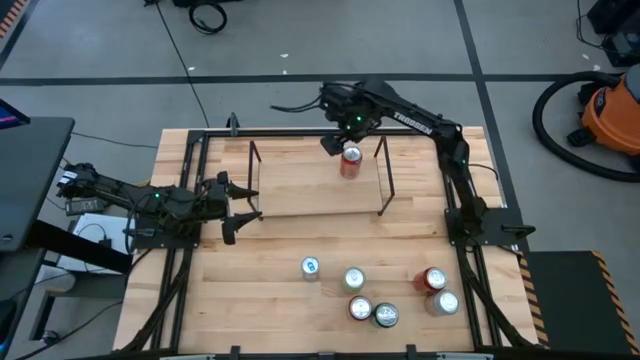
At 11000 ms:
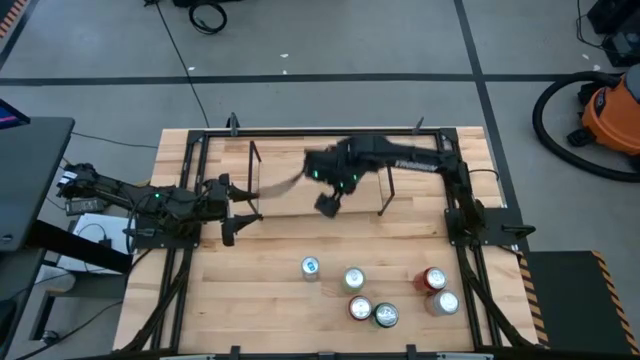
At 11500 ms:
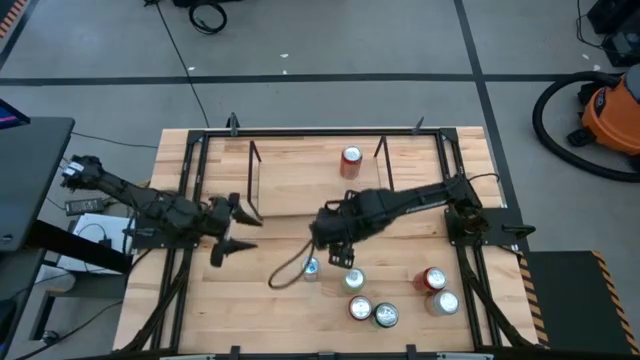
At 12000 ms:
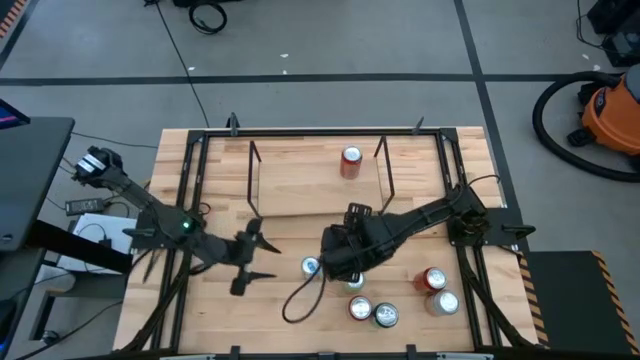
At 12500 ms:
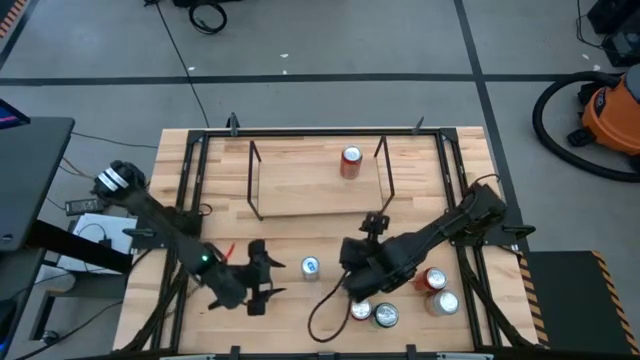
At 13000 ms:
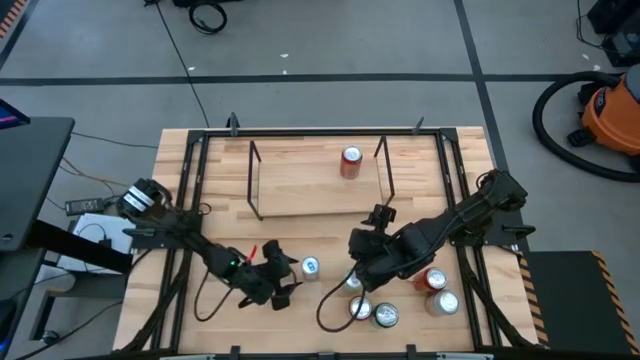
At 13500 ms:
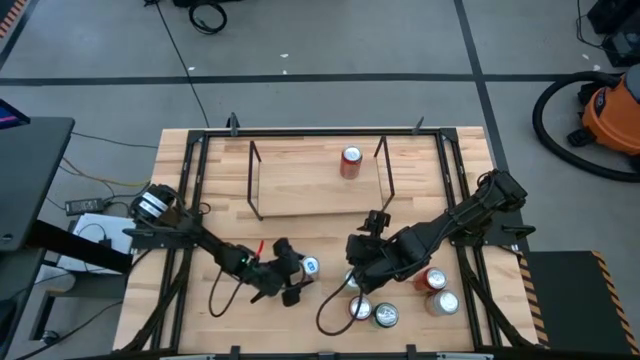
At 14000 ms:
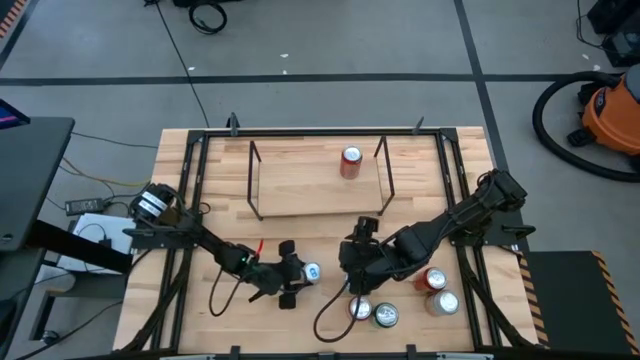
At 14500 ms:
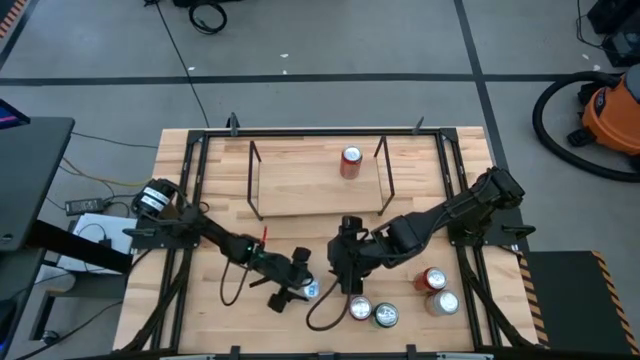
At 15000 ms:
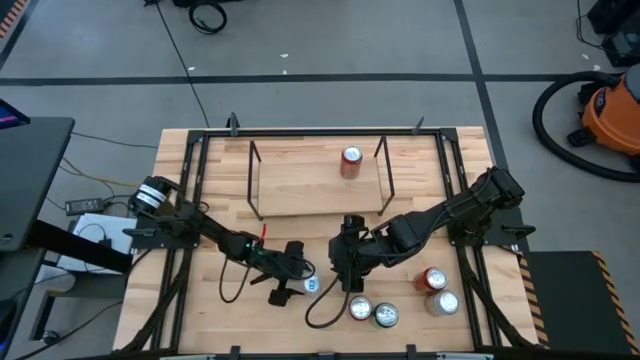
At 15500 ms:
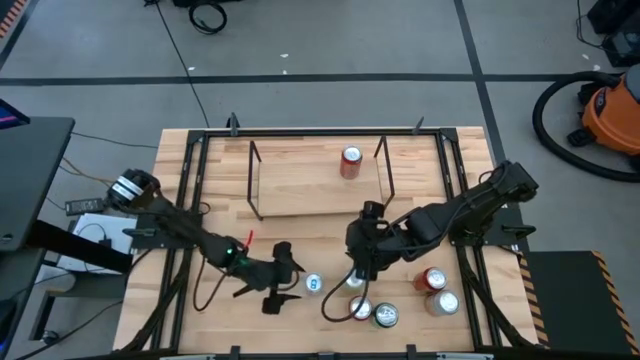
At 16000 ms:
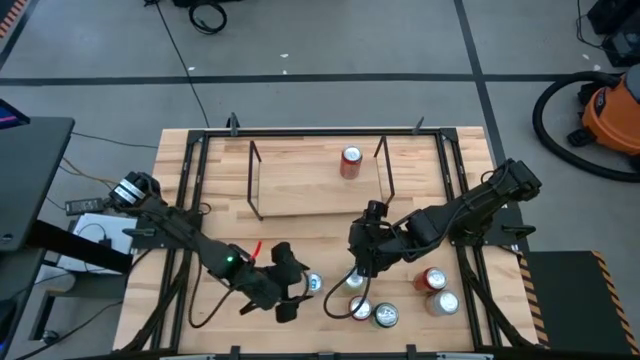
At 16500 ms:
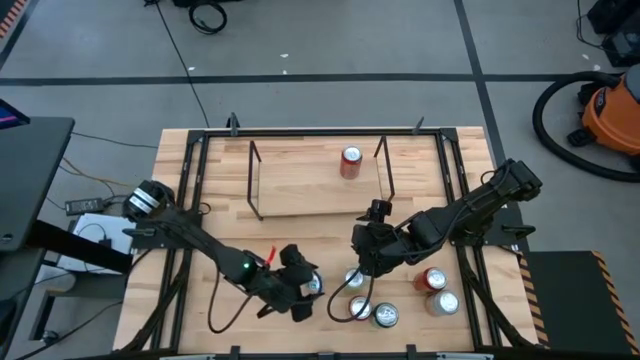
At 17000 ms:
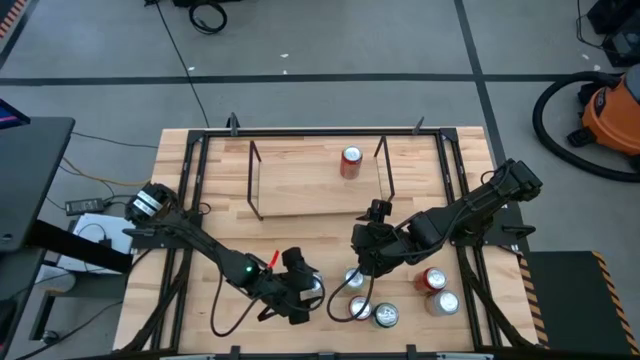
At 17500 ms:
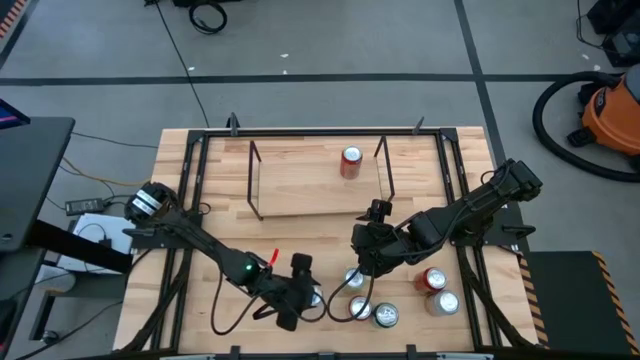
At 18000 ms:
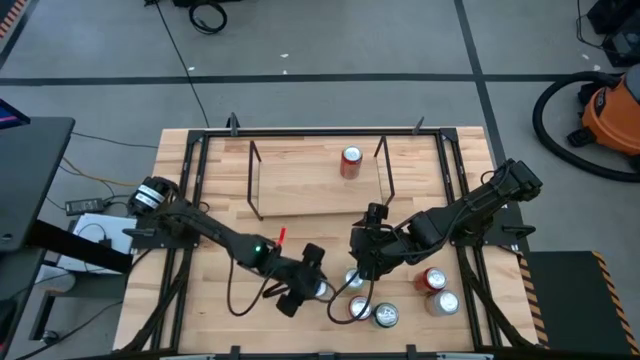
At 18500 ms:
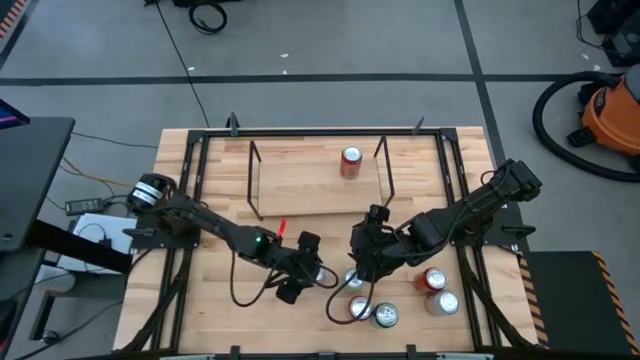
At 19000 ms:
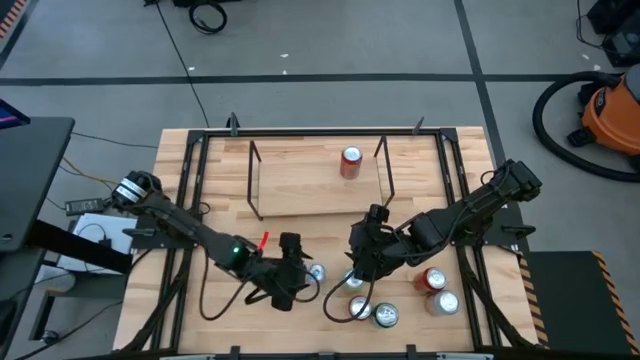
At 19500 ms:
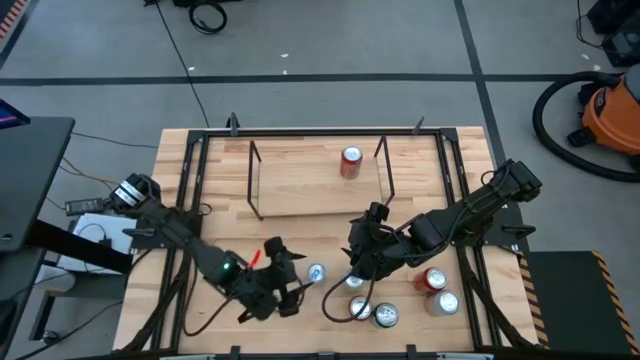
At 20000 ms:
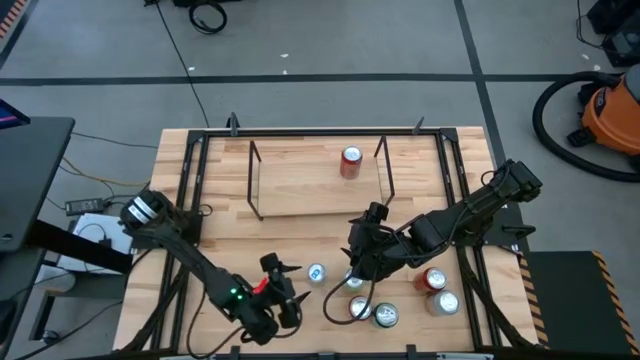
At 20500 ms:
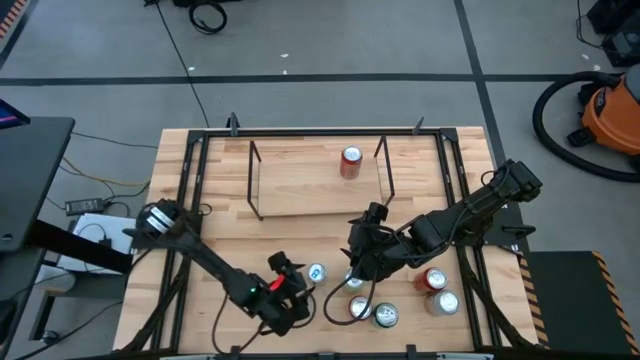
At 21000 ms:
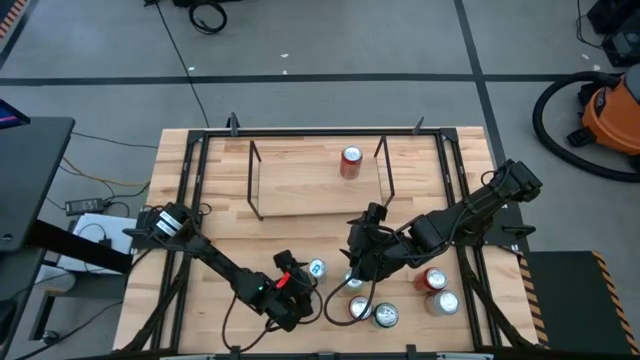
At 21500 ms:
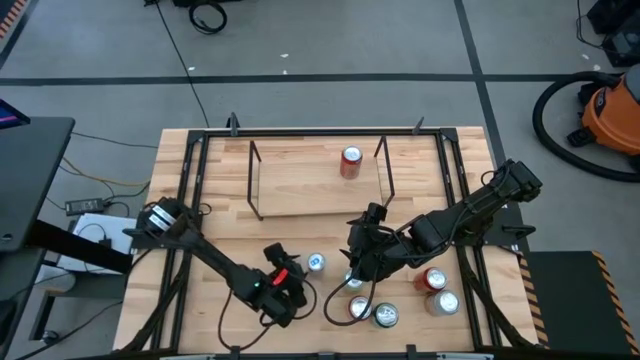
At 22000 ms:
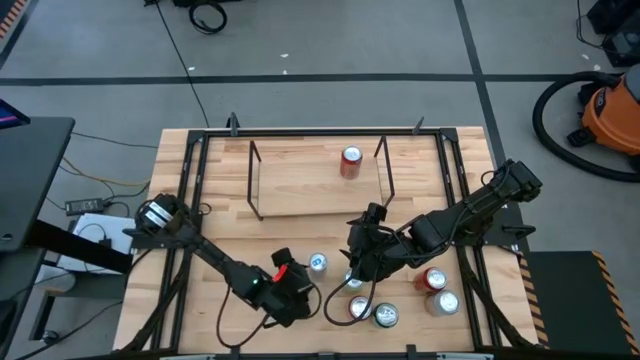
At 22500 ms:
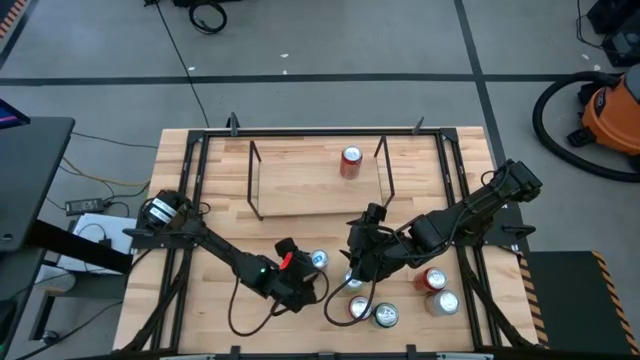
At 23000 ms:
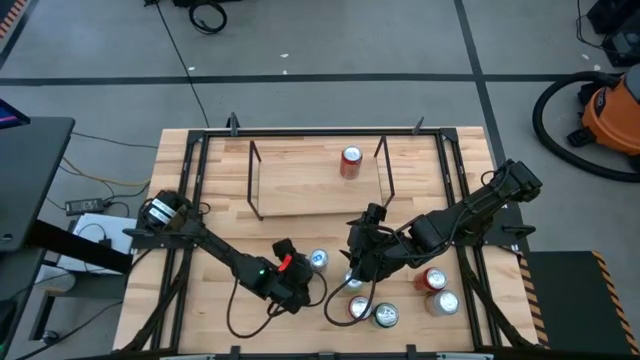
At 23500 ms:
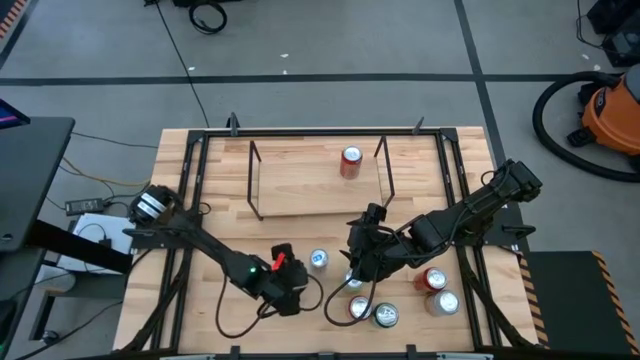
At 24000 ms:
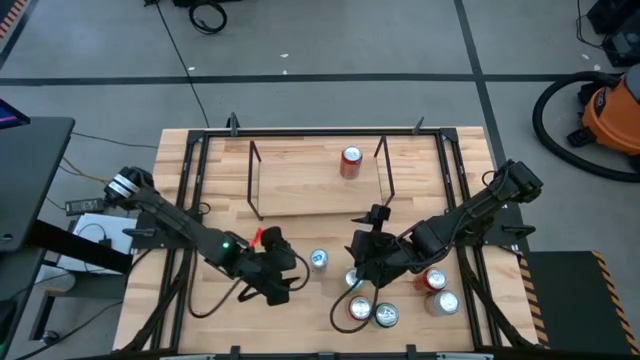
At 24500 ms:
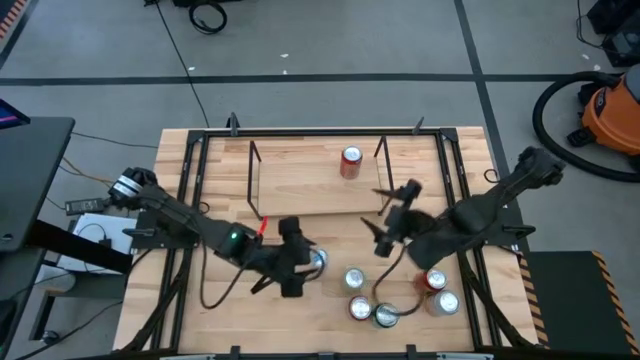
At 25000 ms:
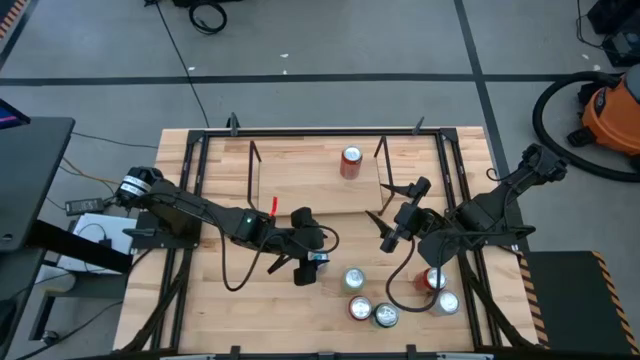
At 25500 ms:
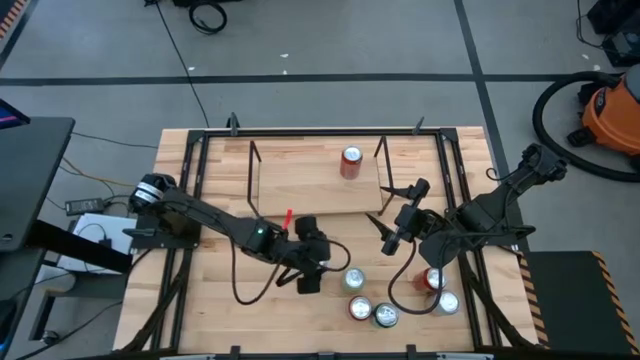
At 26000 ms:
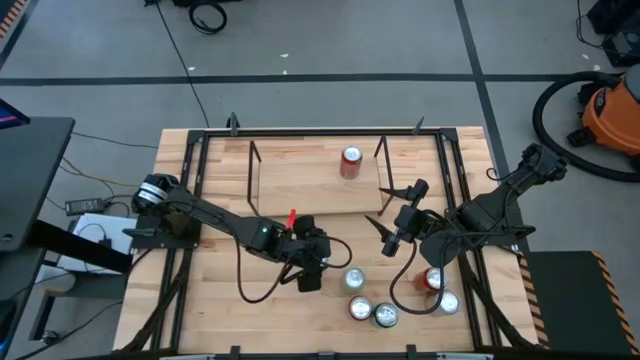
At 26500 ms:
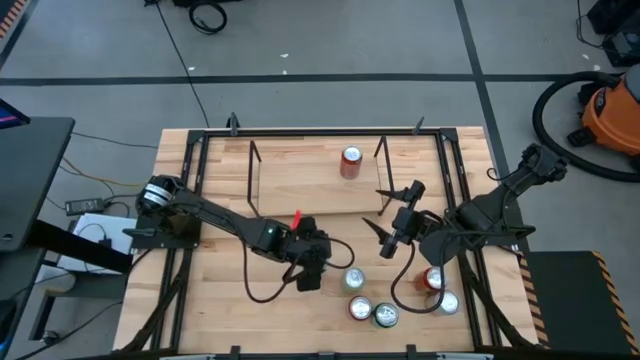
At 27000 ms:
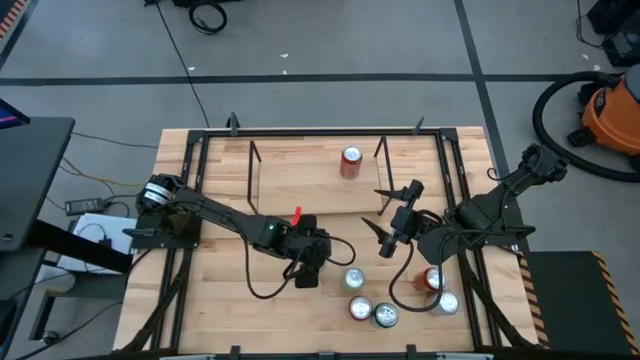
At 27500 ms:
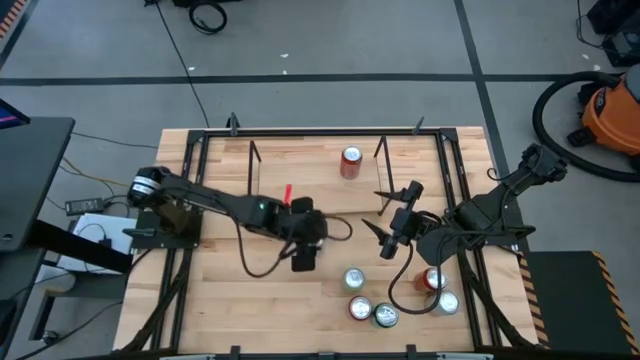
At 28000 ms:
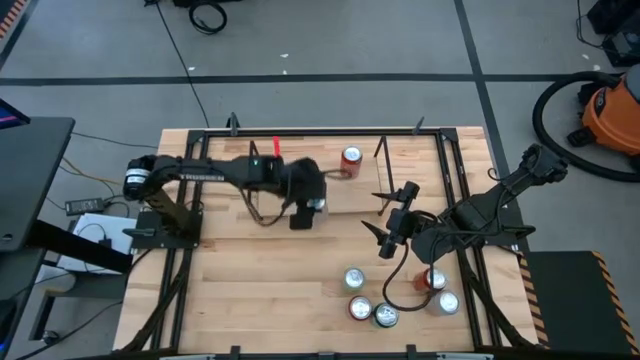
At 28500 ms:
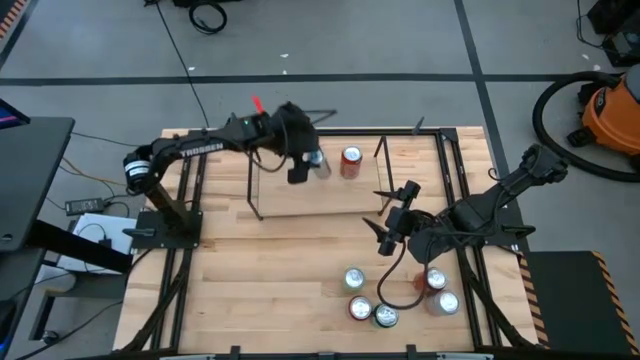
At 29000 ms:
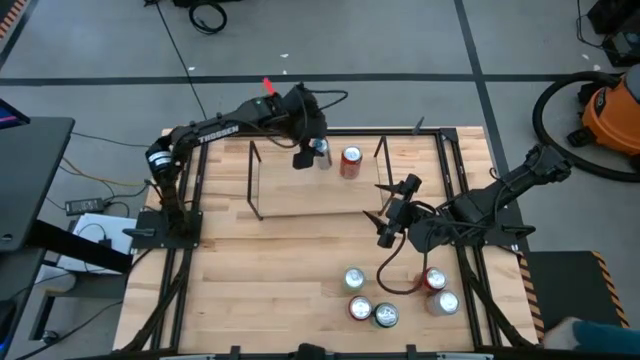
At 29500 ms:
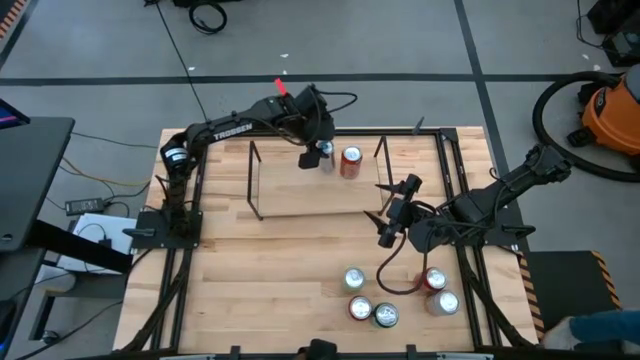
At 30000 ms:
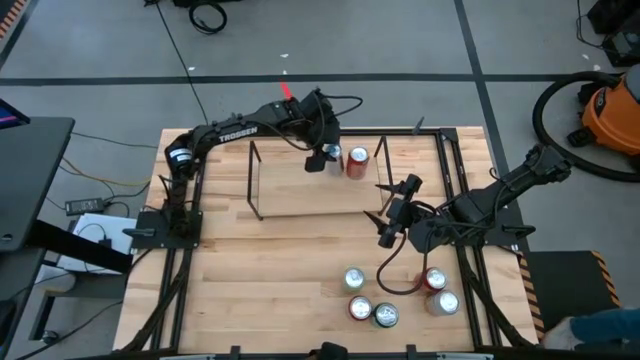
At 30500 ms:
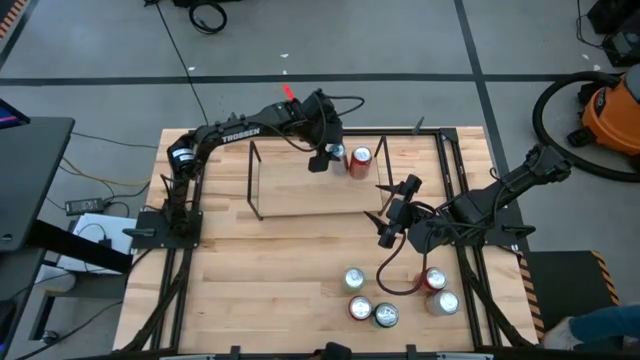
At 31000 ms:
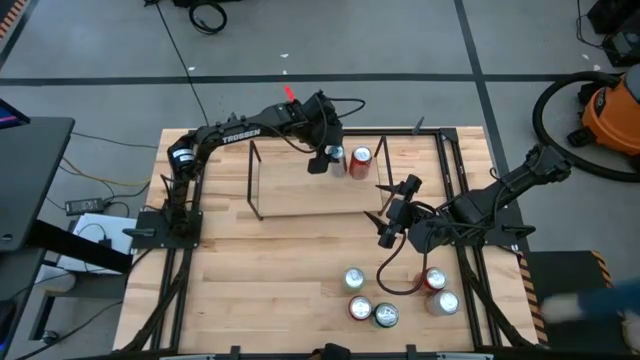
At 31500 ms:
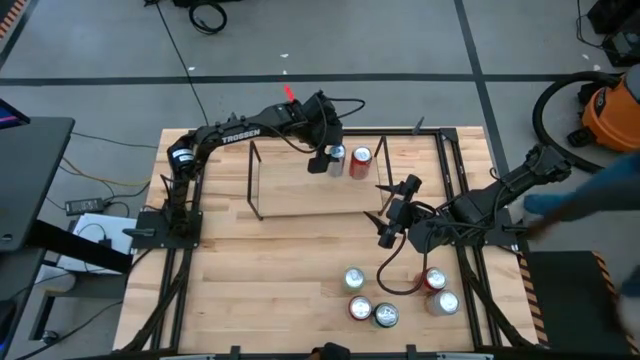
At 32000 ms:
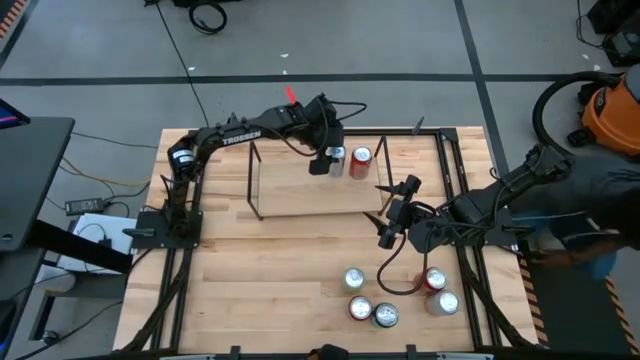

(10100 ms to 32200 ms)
Task: Place canned beverage on shelf
Put the blue soda can on the shelf
